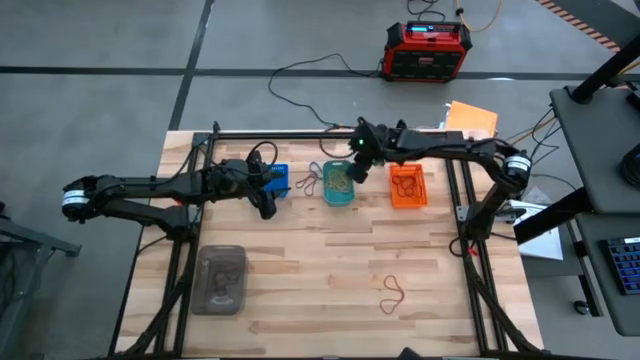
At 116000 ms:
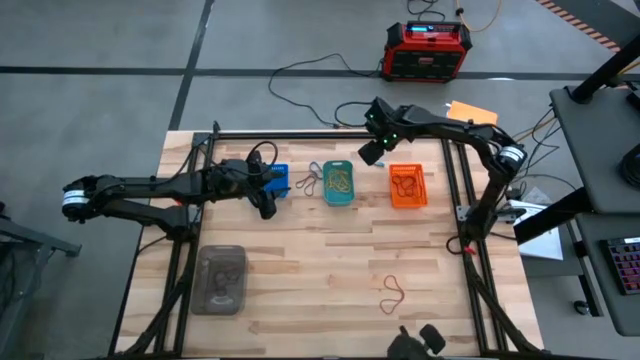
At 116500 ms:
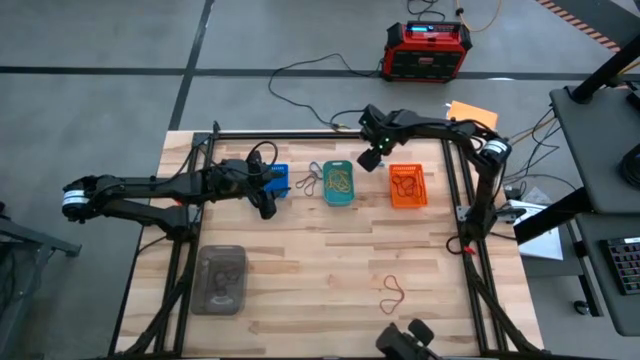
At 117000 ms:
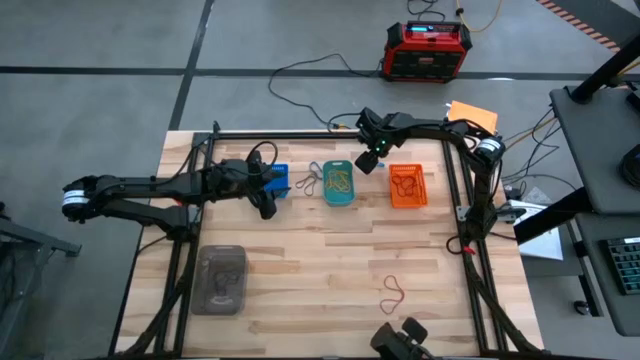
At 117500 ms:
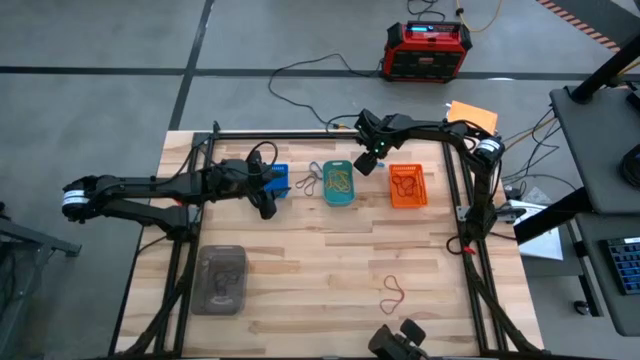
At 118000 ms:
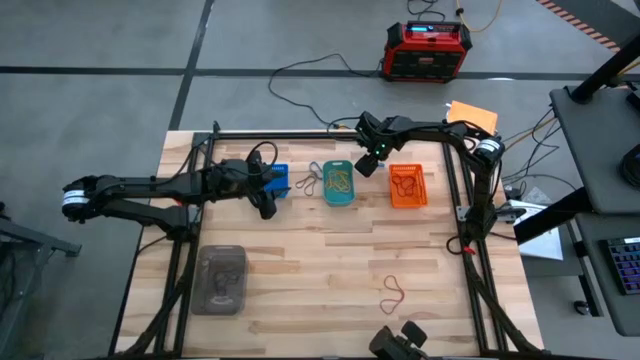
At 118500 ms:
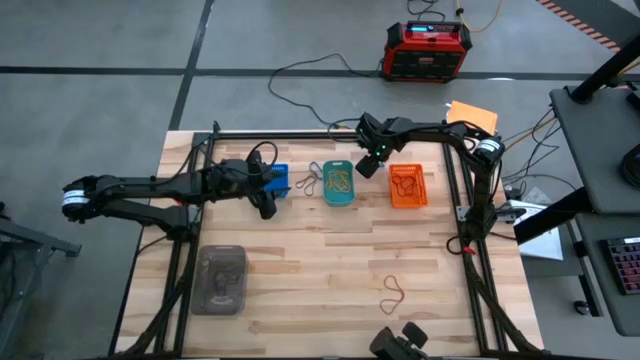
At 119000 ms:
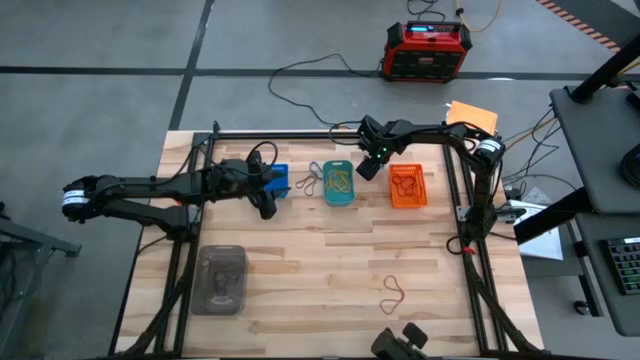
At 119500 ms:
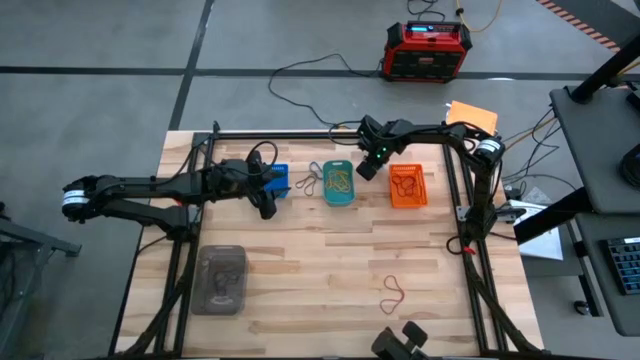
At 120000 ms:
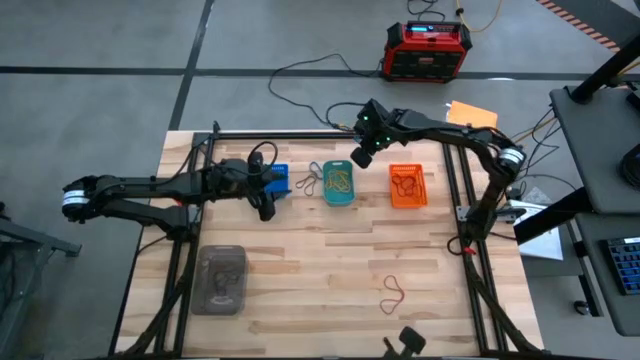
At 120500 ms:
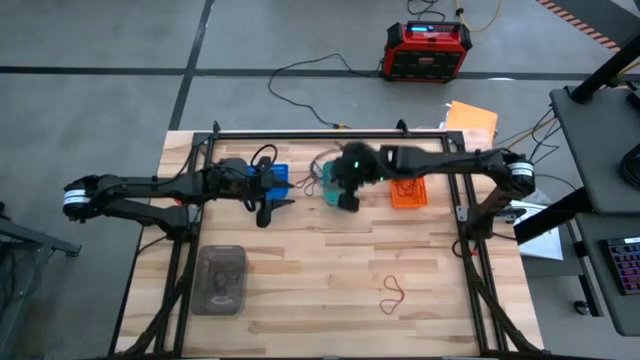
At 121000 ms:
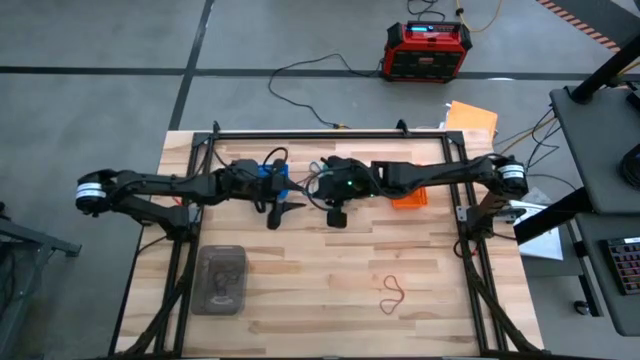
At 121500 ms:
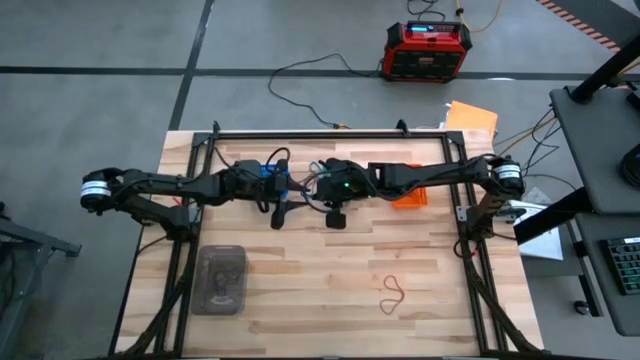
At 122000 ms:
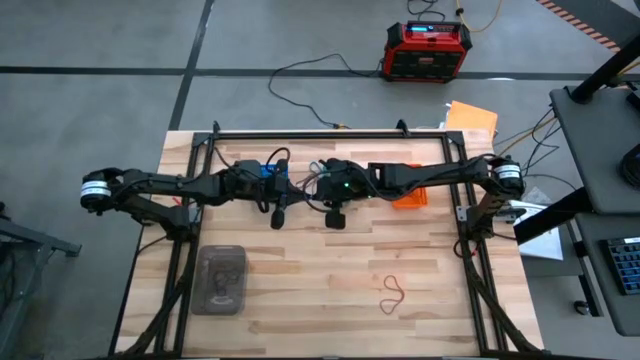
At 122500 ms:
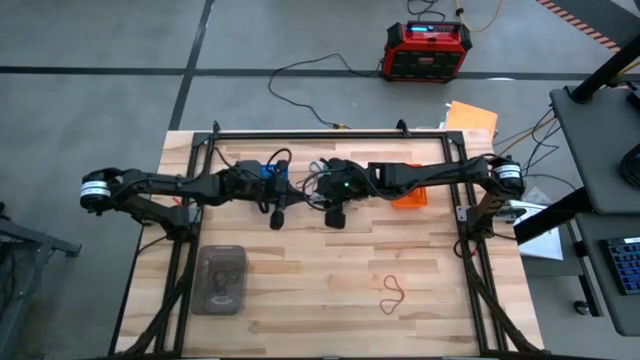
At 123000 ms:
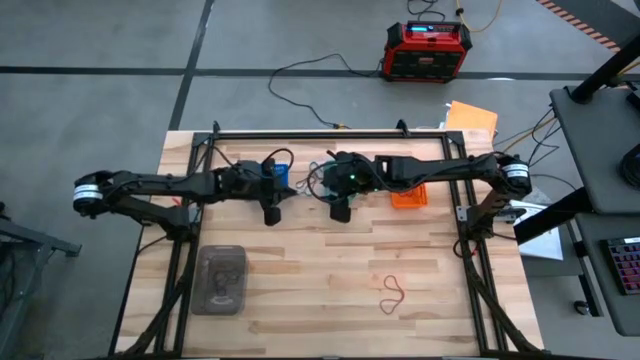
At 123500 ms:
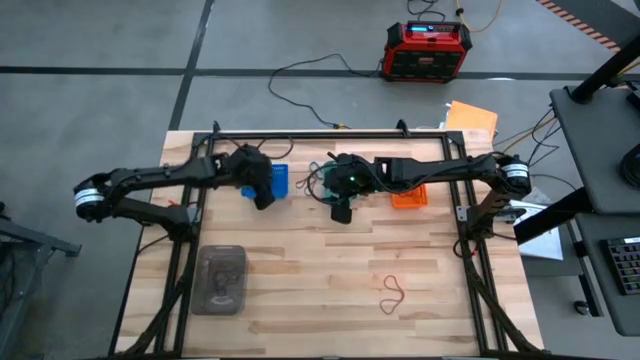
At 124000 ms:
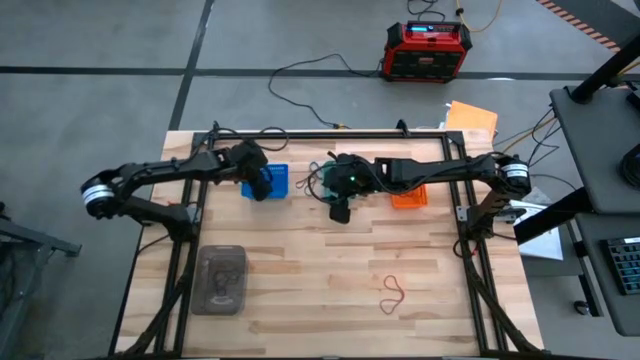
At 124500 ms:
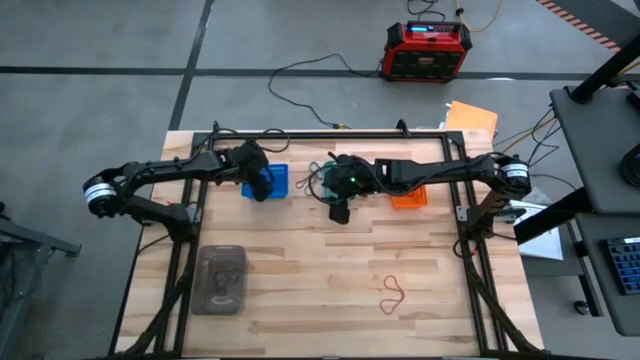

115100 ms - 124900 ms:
Task: Sort rubber bands into baskets
Put the right blue rubber band into the blue bin

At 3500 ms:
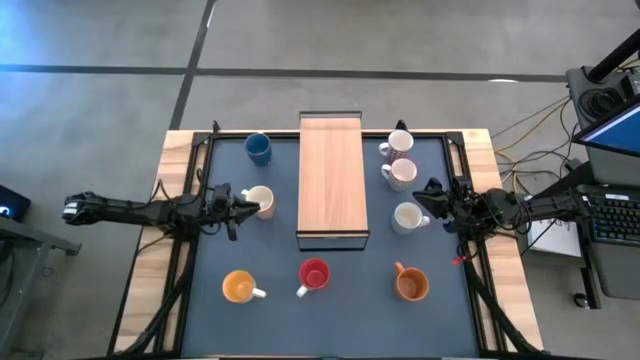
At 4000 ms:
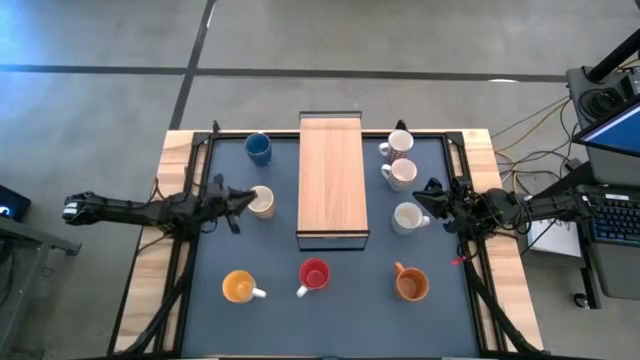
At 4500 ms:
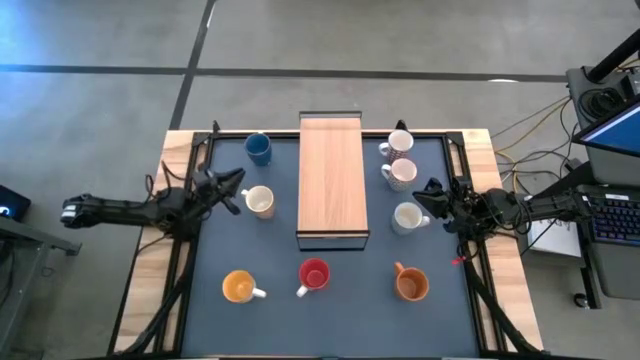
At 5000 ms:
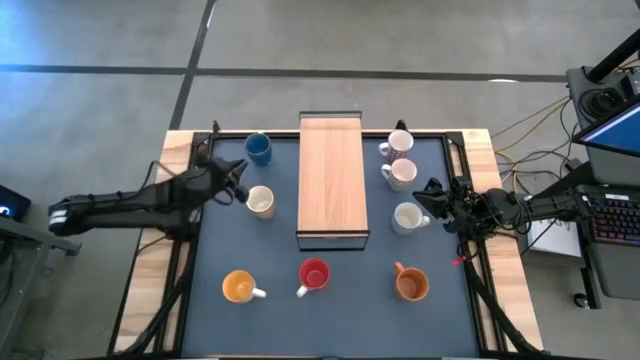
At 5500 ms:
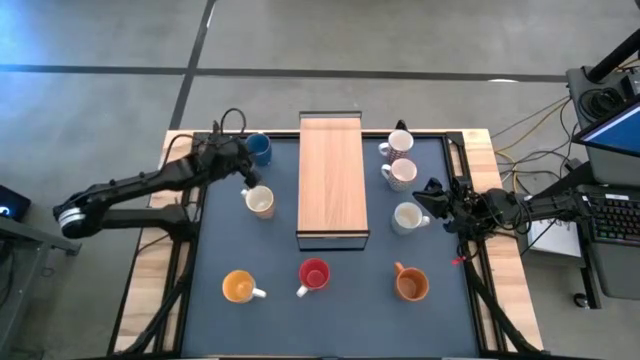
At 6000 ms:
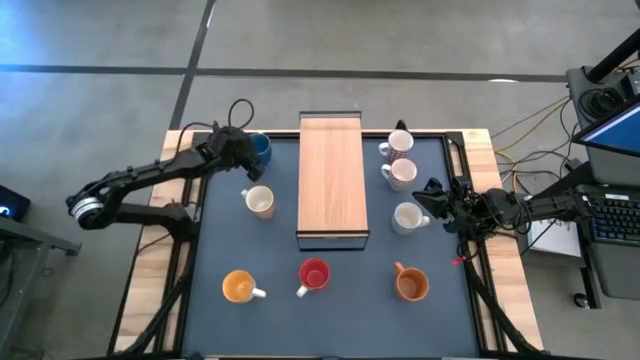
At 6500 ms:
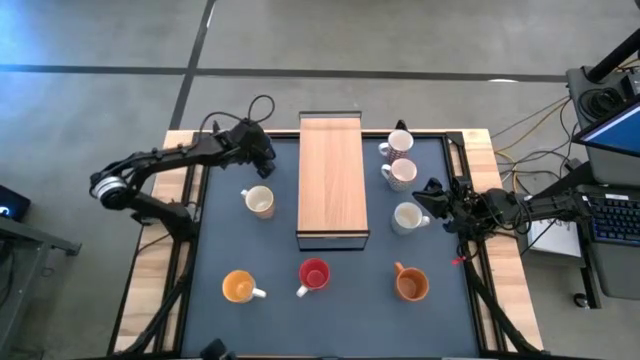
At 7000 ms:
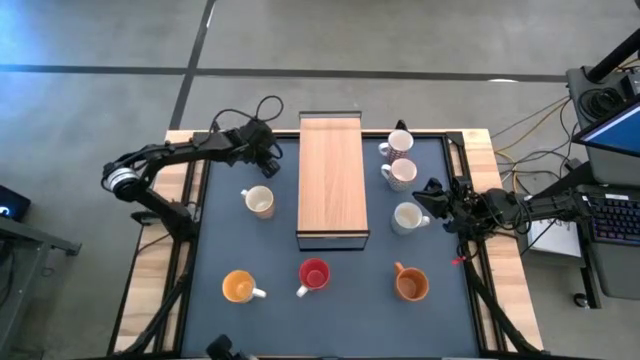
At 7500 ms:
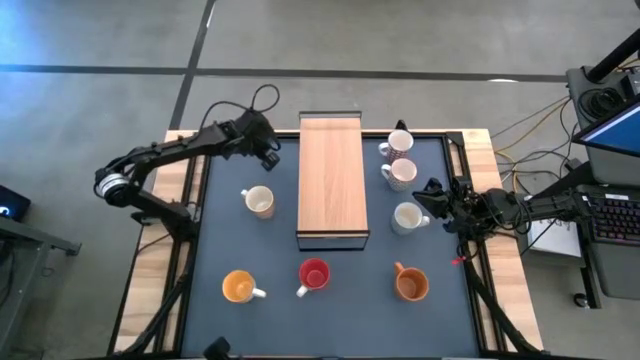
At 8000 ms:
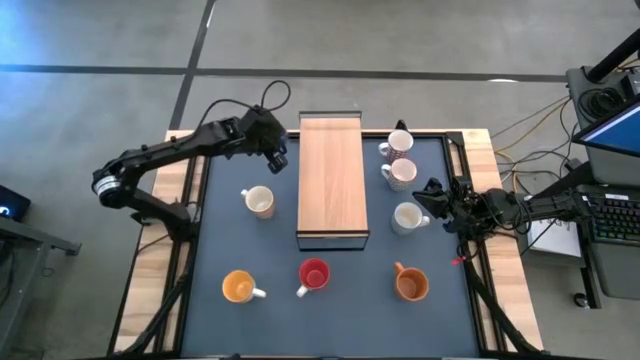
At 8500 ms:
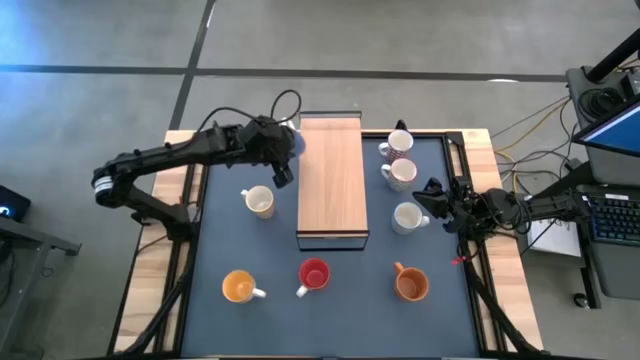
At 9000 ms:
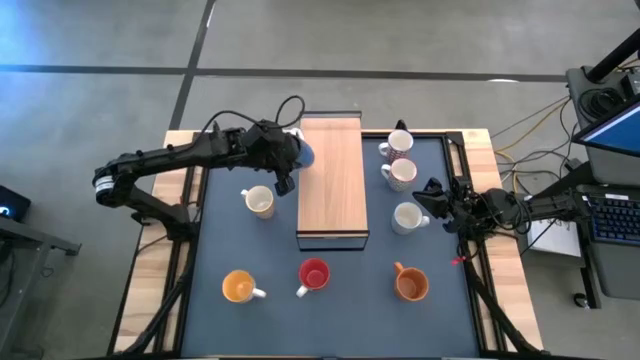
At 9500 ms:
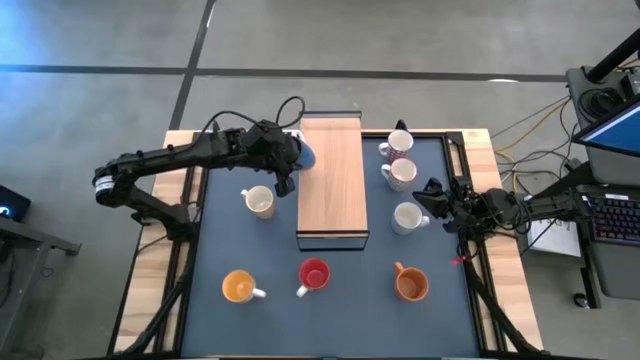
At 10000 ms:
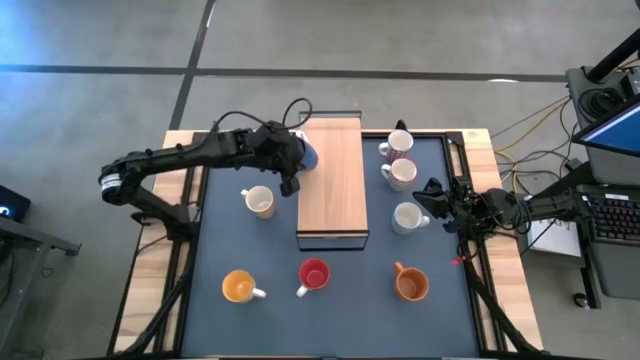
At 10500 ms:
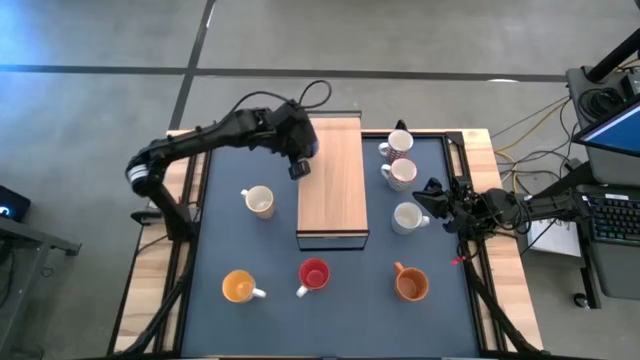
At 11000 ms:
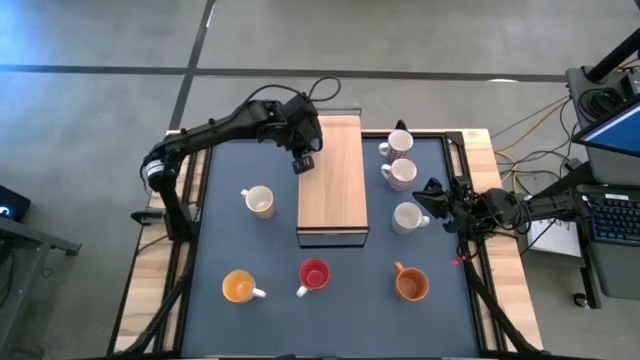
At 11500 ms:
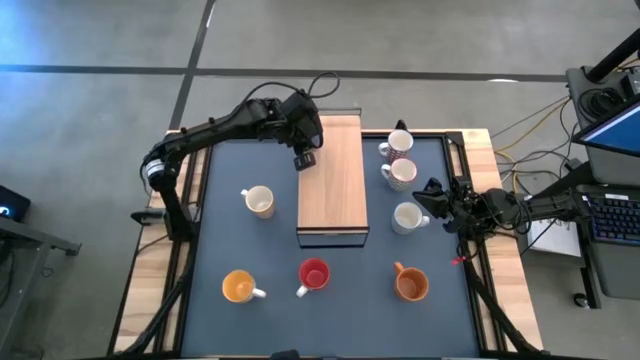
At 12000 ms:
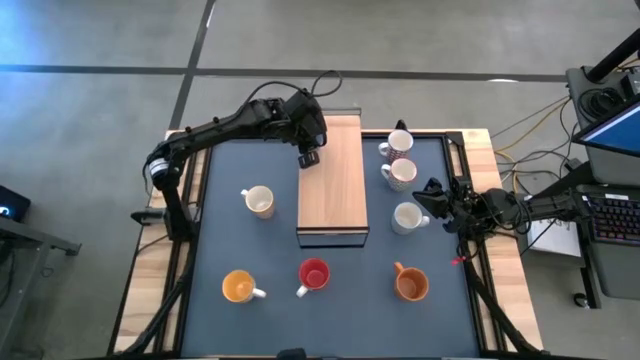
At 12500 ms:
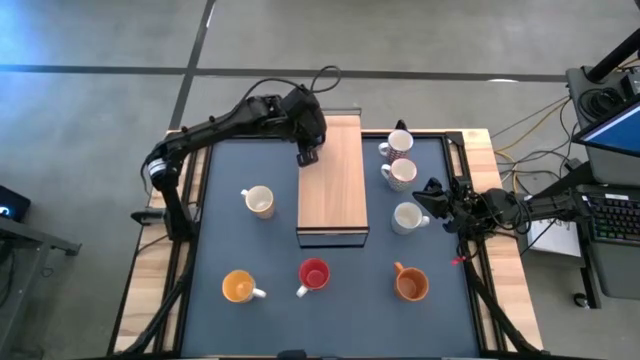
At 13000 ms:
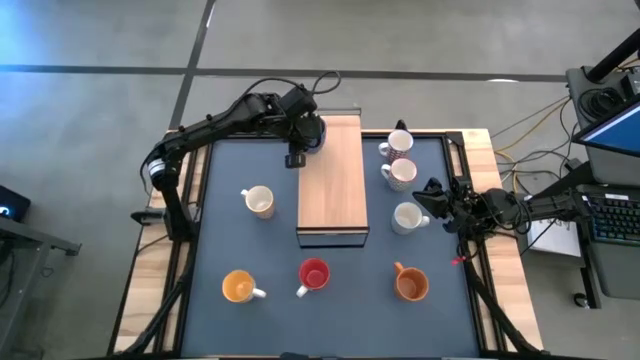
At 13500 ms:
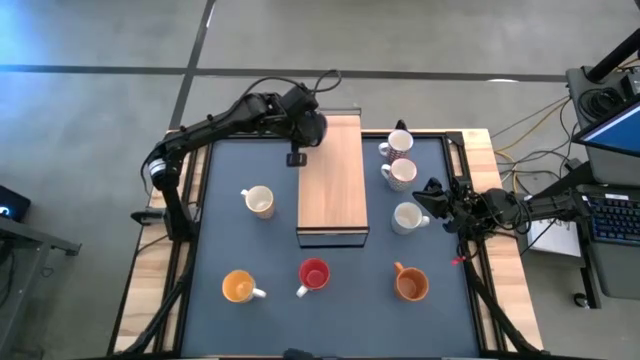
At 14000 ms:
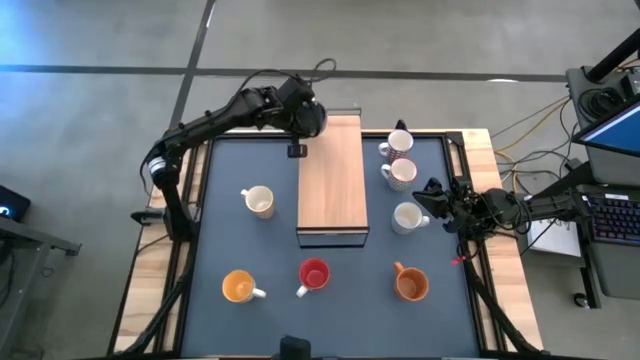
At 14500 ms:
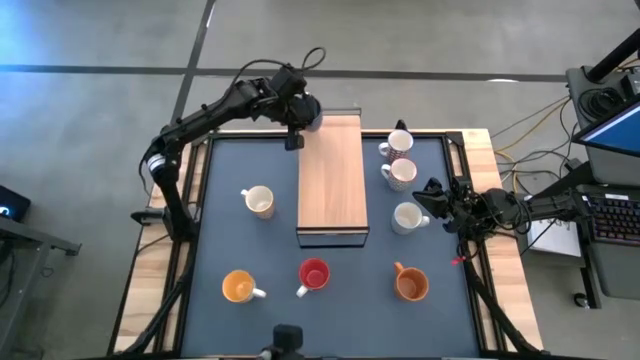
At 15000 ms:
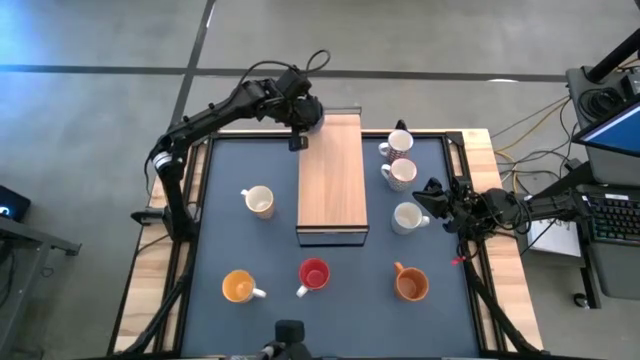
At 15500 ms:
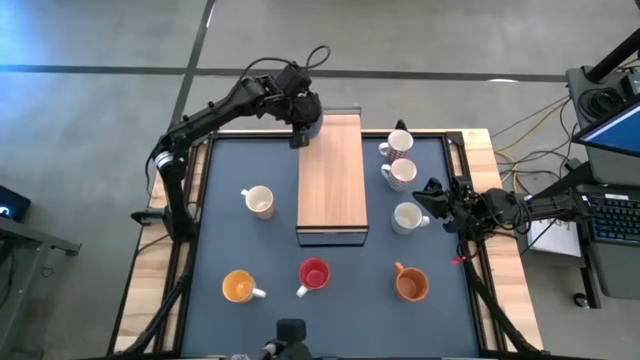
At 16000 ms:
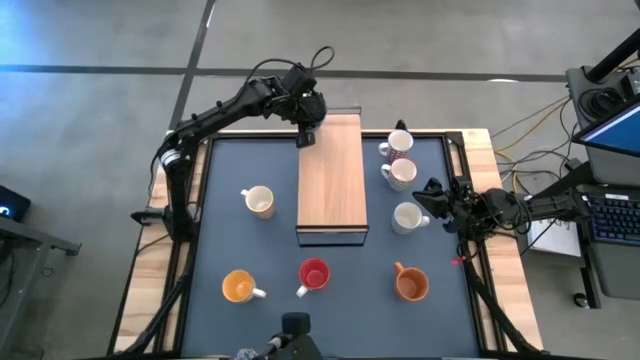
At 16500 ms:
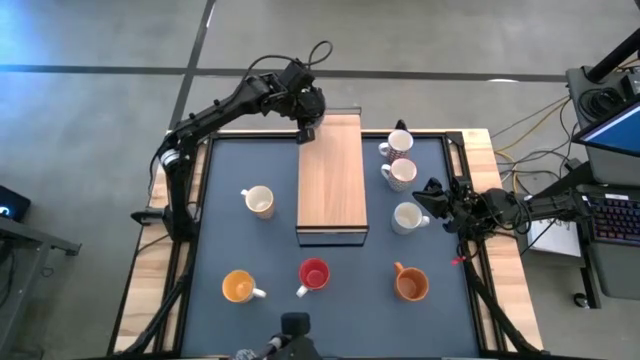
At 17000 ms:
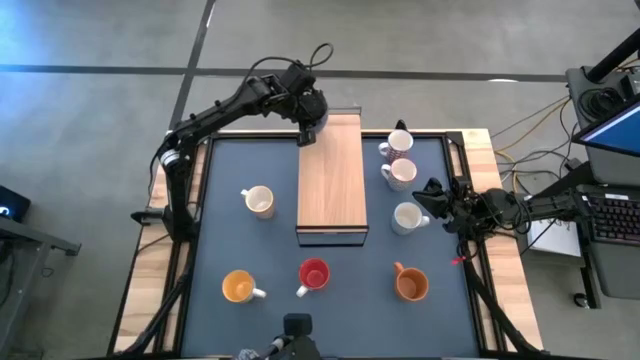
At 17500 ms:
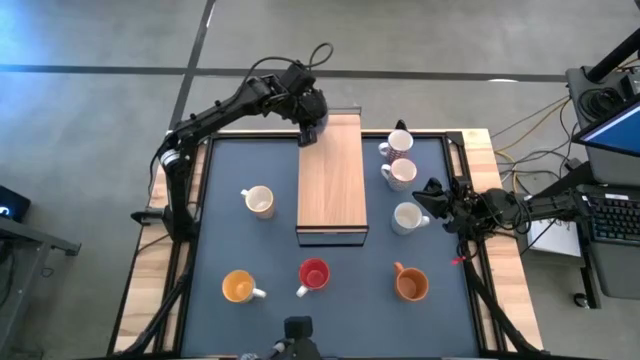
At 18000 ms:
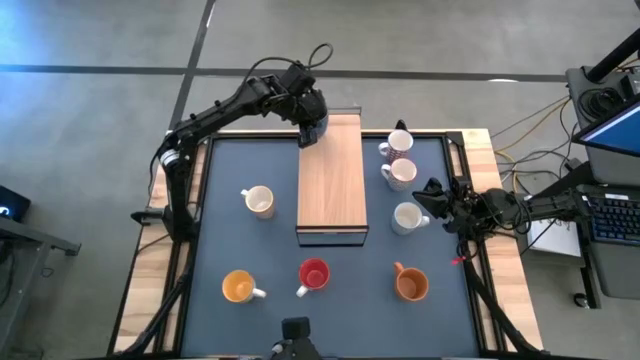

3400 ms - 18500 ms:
Task: Place coffee mugs
Put the blue mug on the shelf
